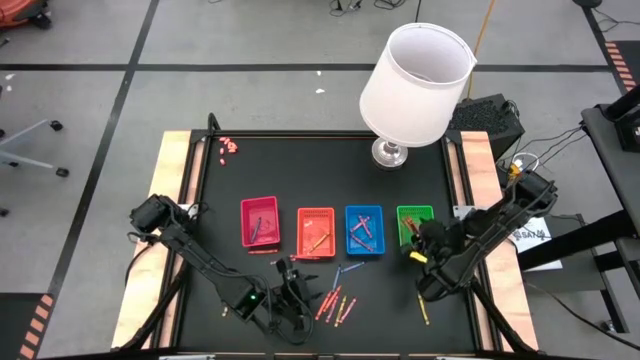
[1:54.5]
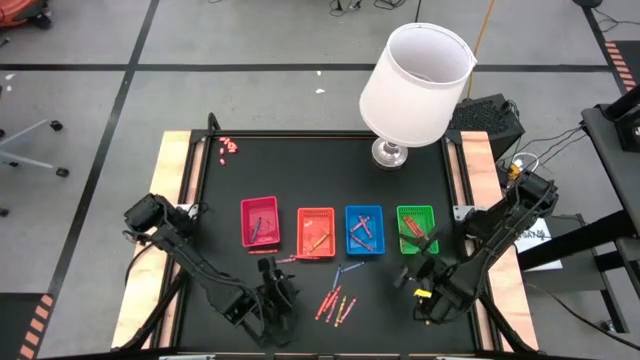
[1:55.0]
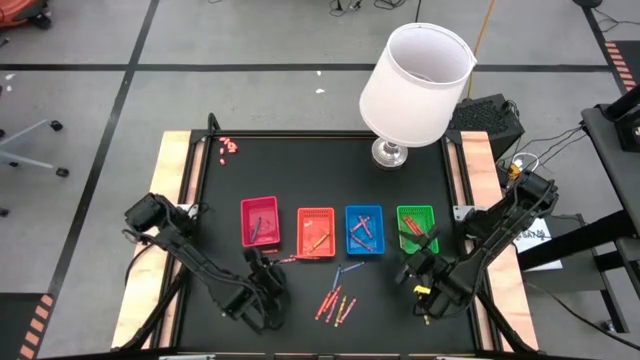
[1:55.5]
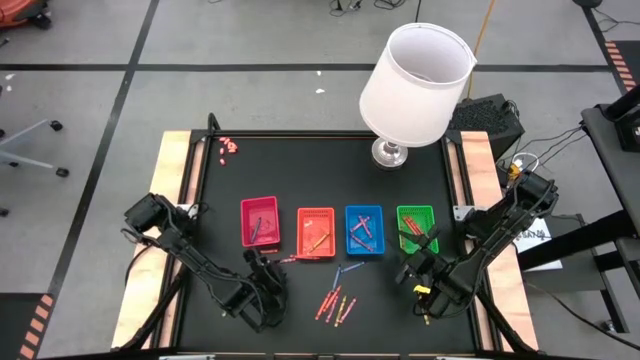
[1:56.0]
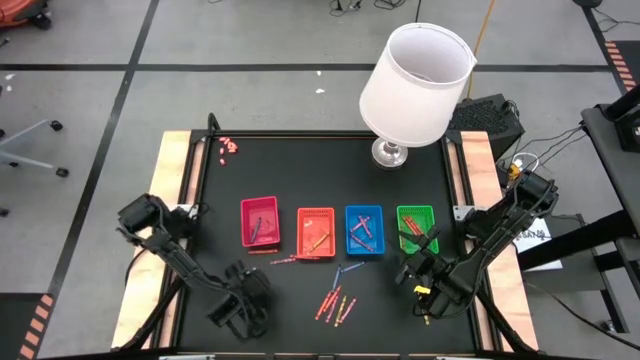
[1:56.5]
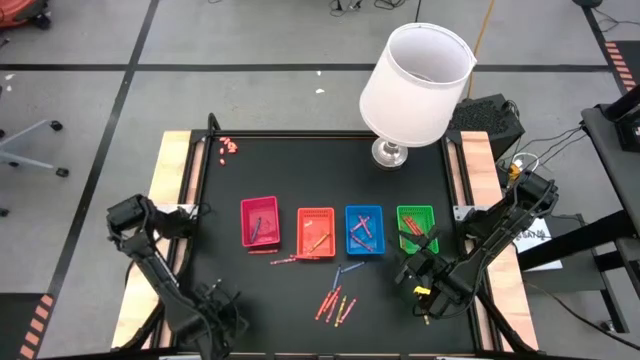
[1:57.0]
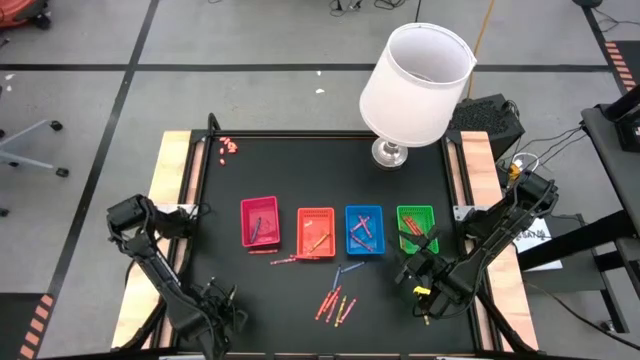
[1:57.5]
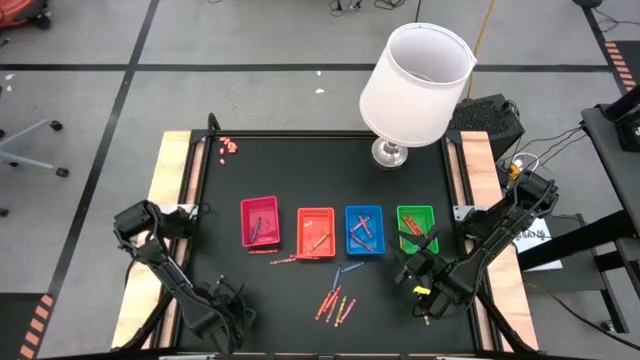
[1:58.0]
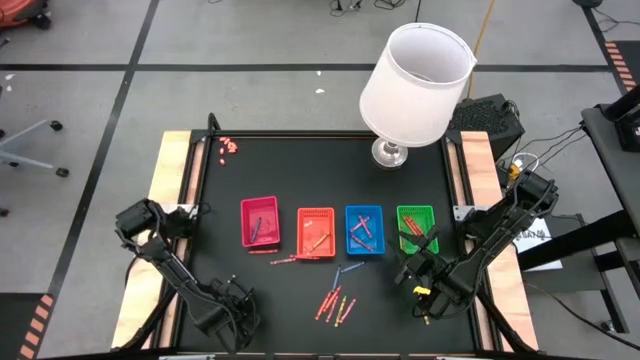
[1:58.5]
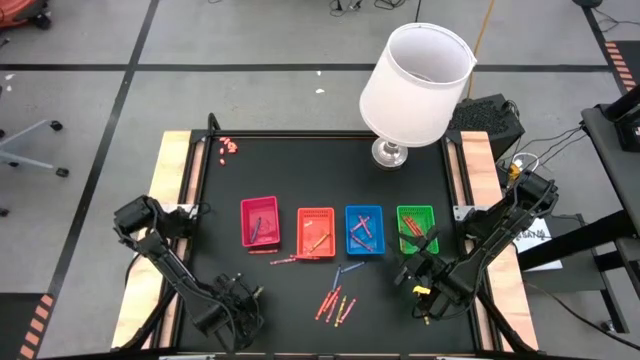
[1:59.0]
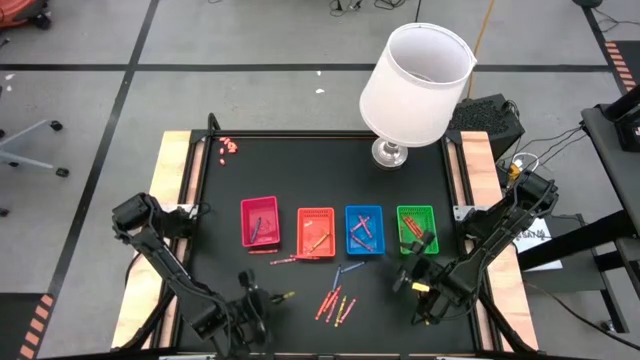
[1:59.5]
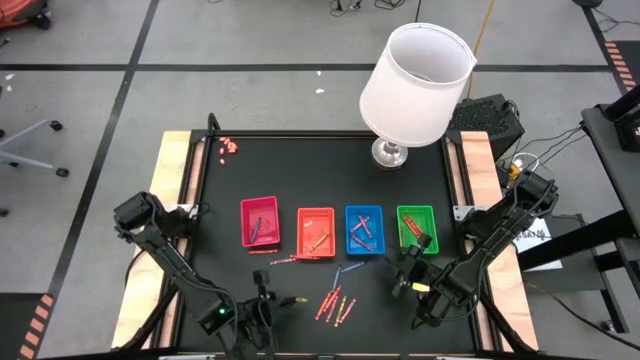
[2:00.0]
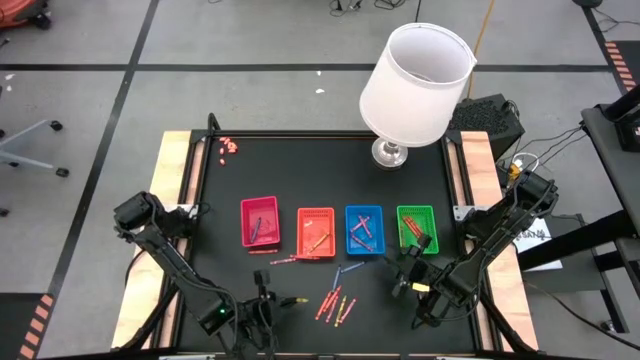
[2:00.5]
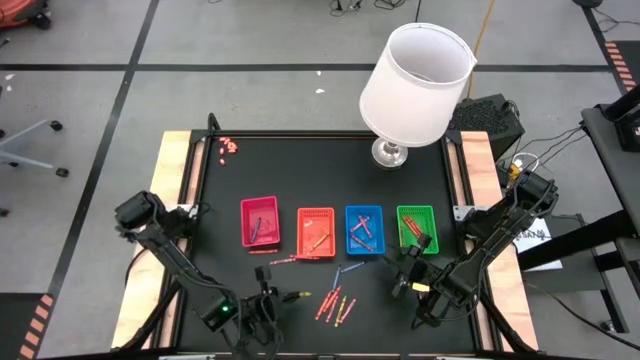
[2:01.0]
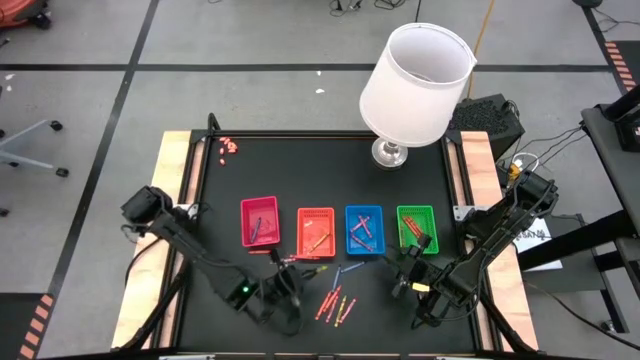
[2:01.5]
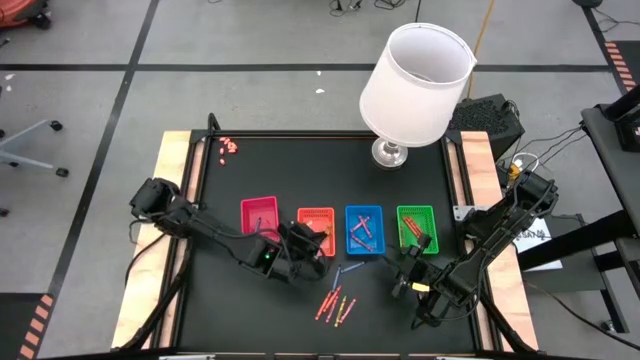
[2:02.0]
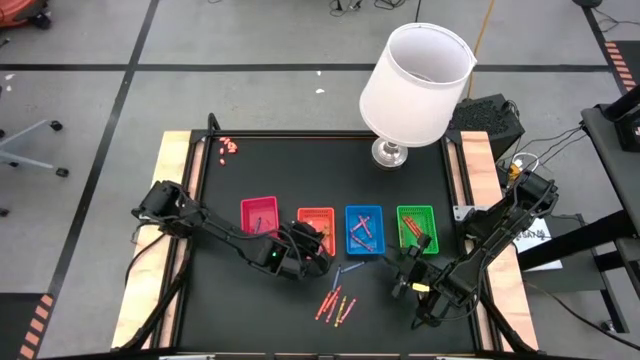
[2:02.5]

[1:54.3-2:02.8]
Task: Sort crayons
Put the yellow crayon into the orange bin

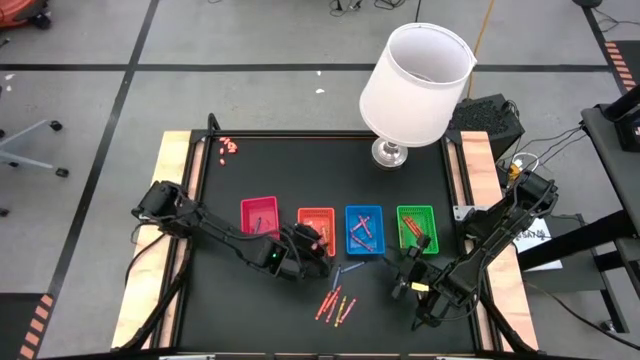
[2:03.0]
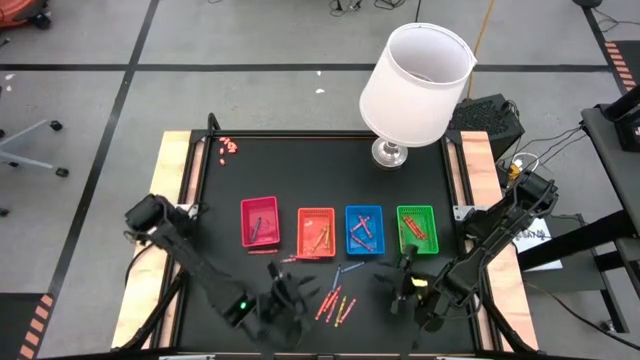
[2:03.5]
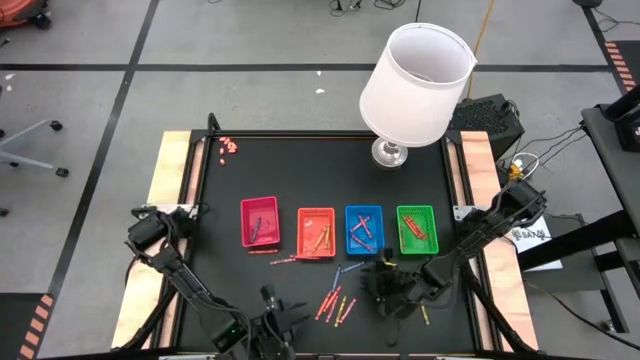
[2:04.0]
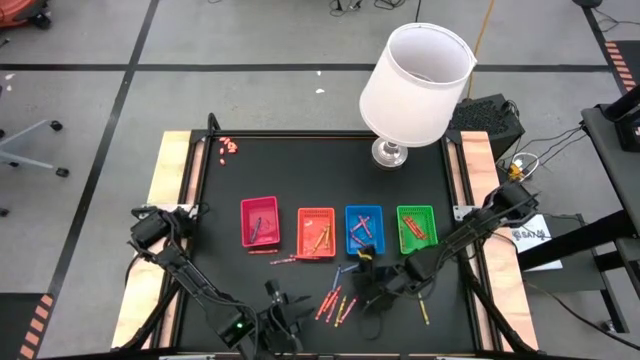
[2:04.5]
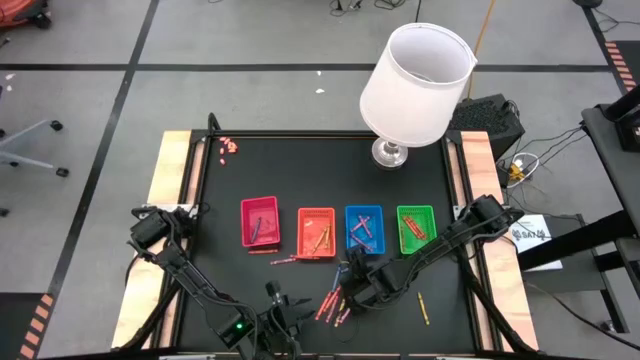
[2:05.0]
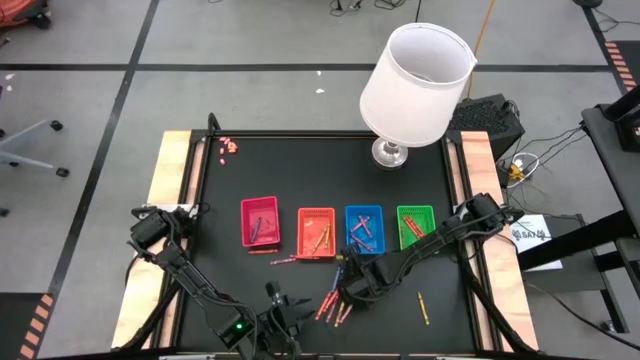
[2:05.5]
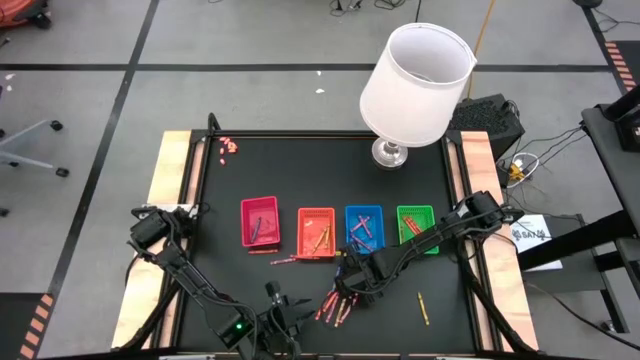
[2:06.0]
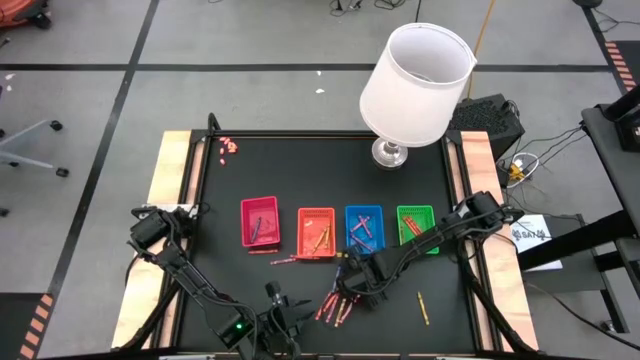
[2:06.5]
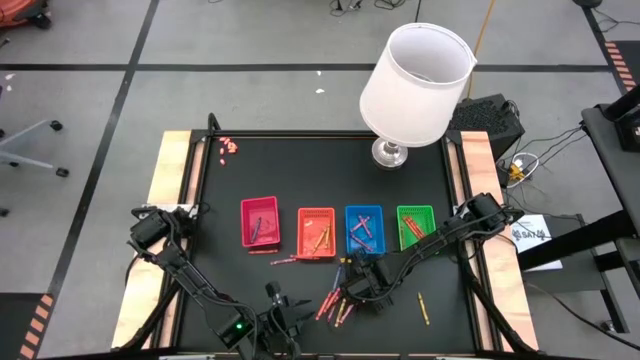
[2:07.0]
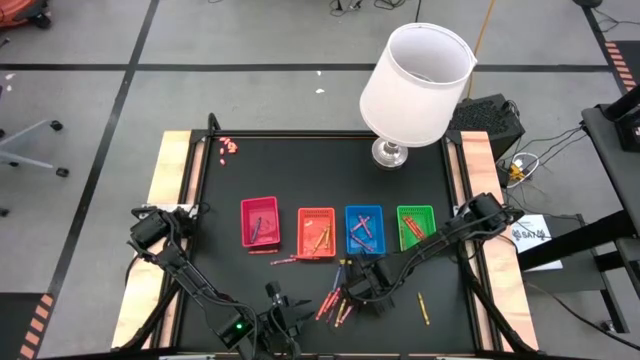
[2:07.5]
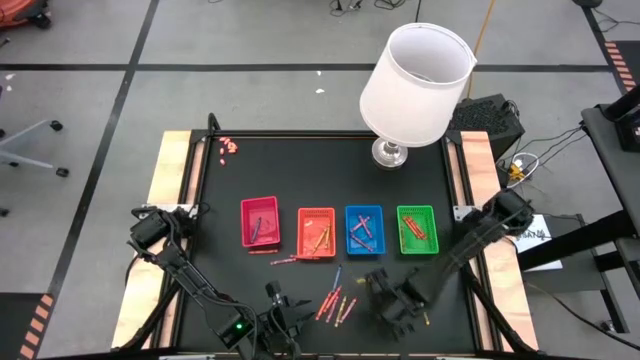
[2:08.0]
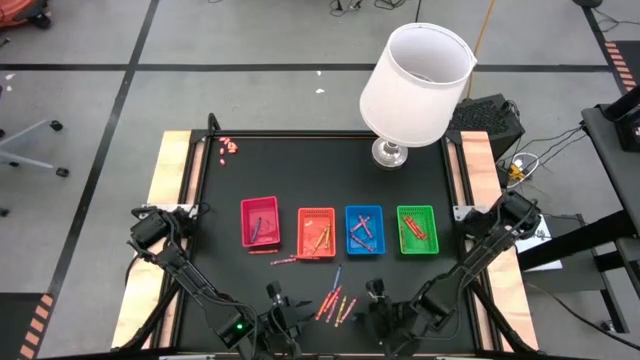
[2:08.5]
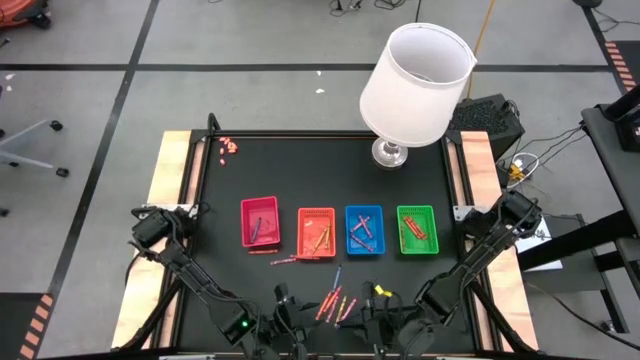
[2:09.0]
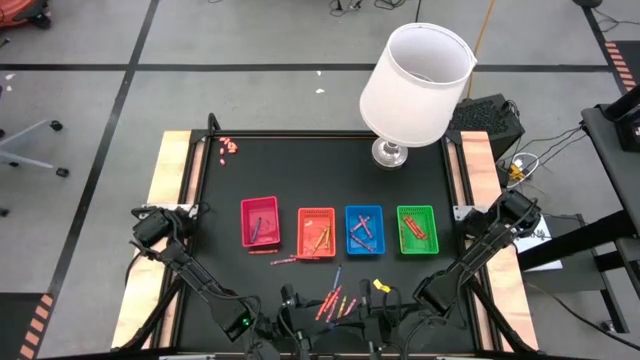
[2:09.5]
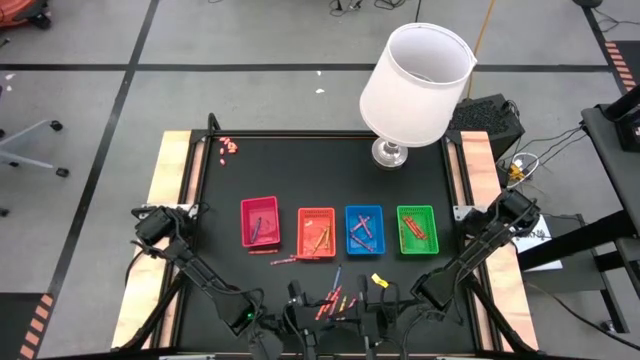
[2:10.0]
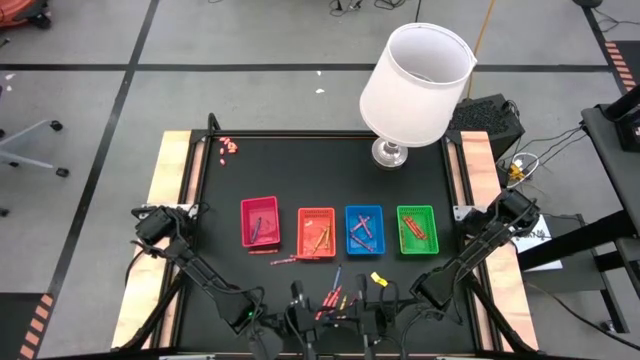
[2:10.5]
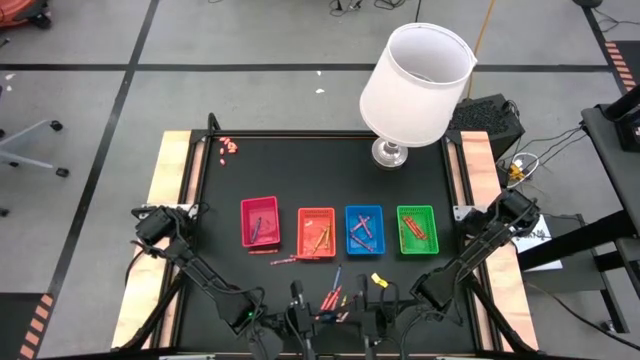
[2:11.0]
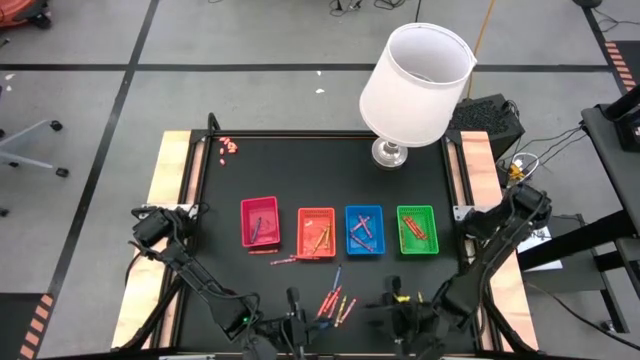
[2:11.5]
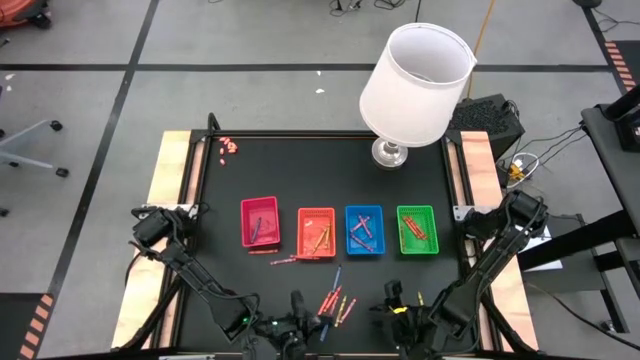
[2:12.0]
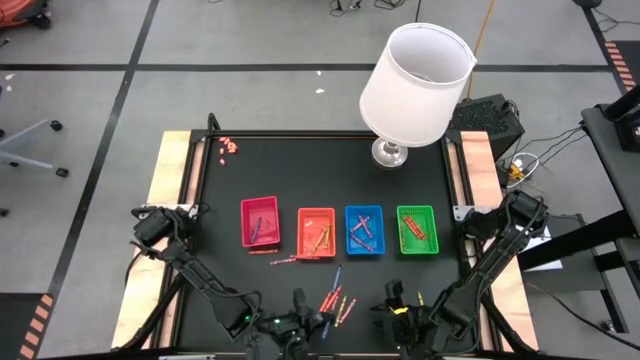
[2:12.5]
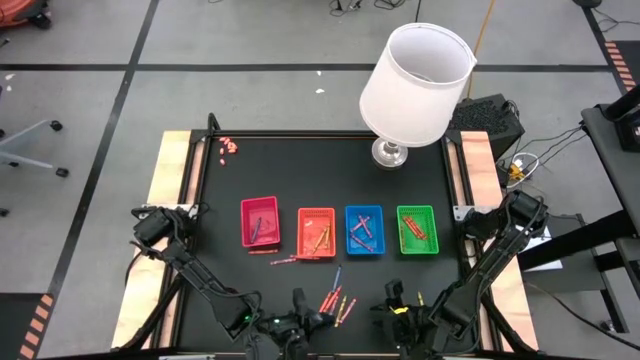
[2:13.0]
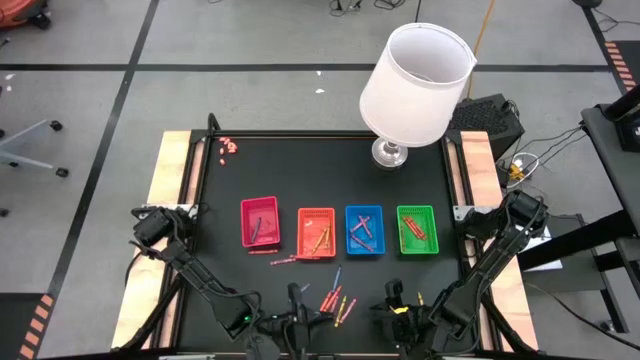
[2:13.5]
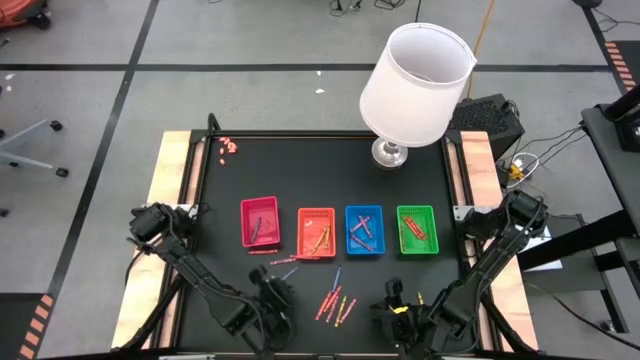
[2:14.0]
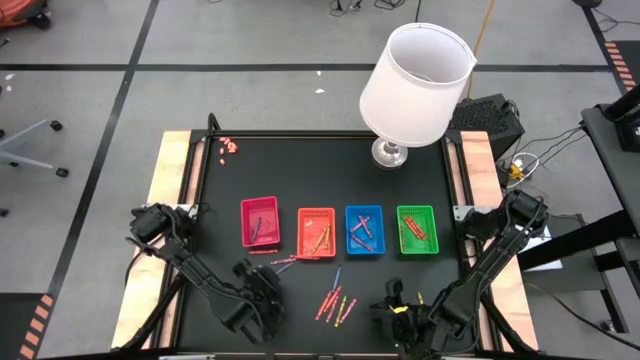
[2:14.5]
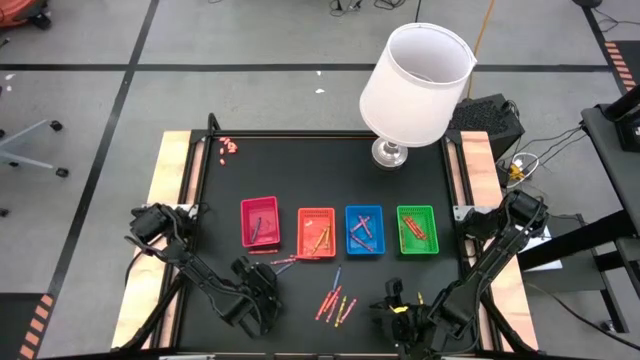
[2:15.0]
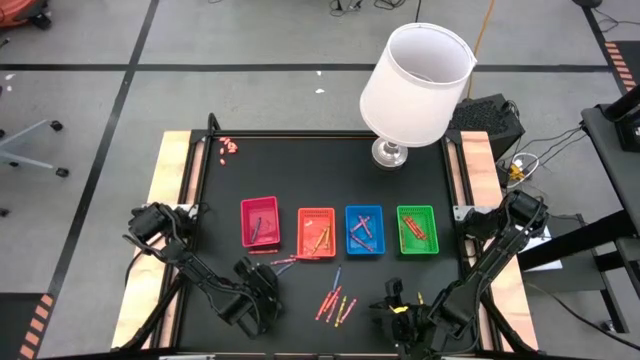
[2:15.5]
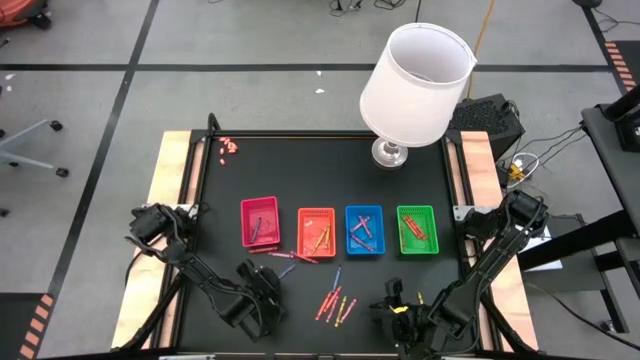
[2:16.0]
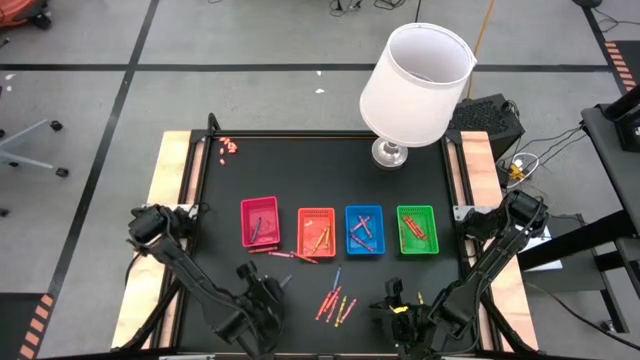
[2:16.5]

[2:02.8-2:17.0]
Put the blue crayon into the red bin
